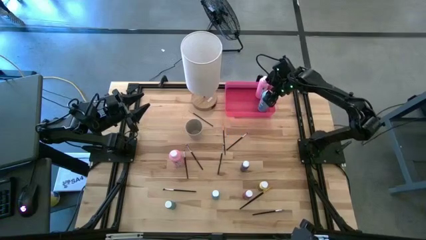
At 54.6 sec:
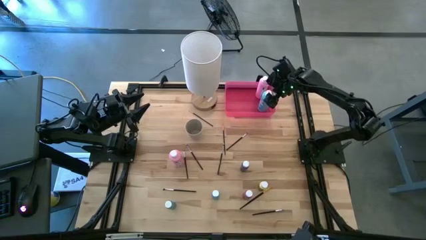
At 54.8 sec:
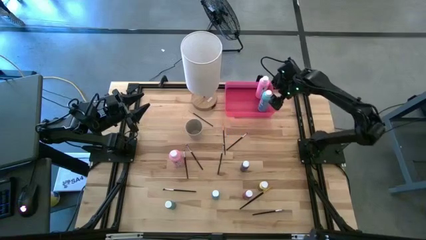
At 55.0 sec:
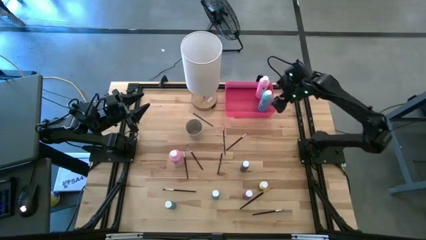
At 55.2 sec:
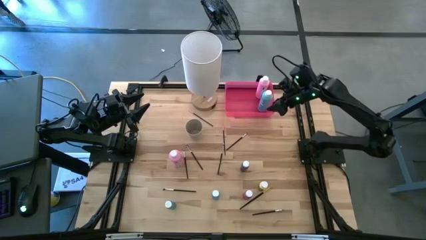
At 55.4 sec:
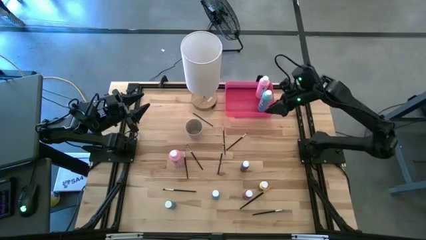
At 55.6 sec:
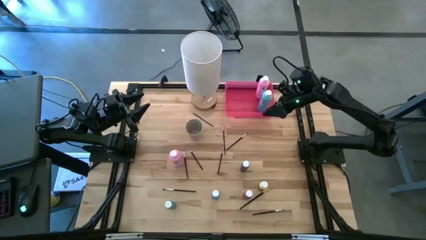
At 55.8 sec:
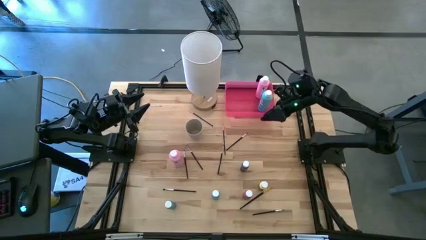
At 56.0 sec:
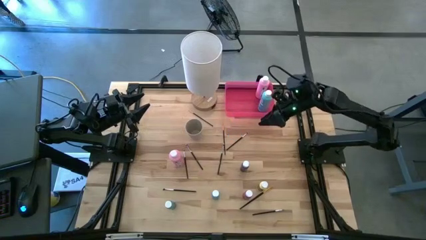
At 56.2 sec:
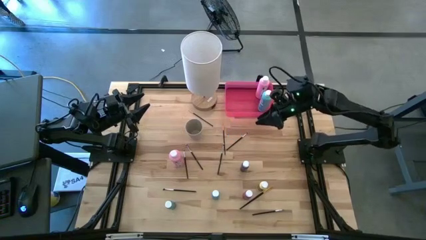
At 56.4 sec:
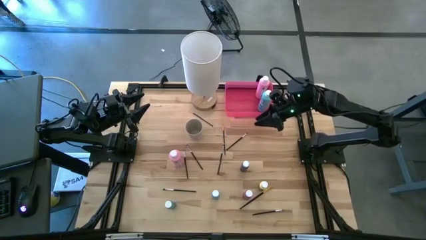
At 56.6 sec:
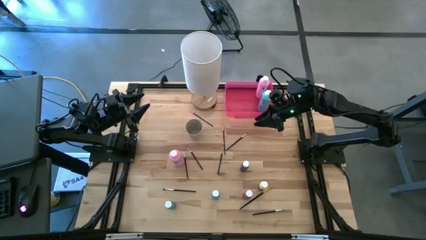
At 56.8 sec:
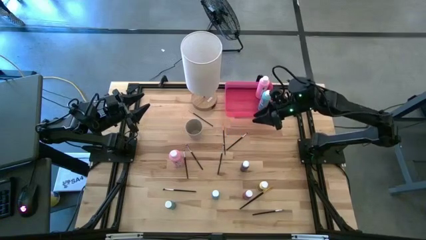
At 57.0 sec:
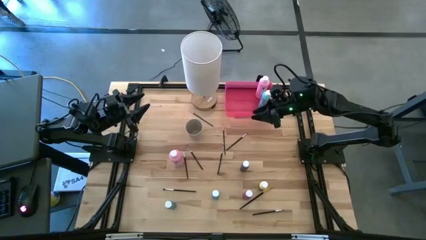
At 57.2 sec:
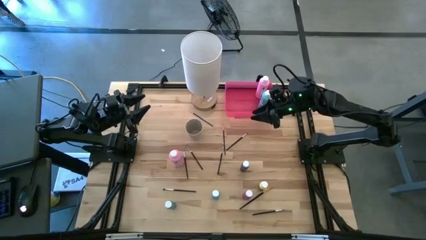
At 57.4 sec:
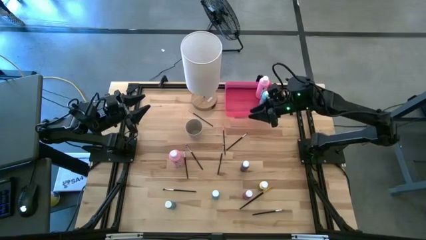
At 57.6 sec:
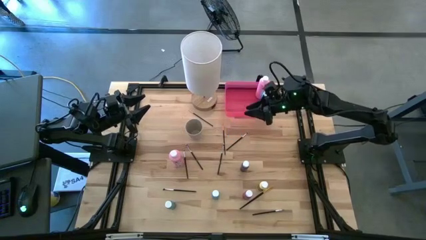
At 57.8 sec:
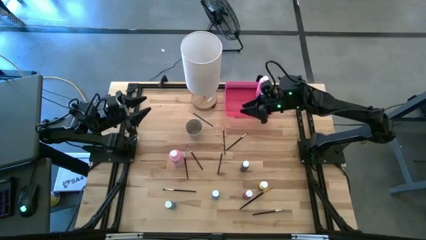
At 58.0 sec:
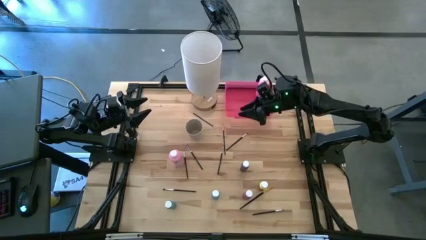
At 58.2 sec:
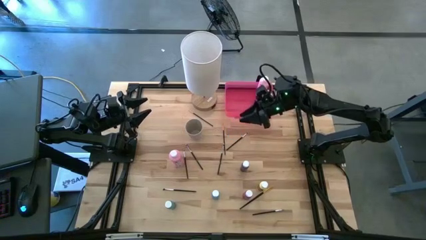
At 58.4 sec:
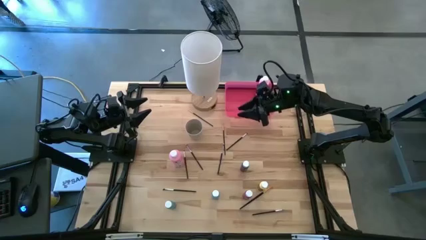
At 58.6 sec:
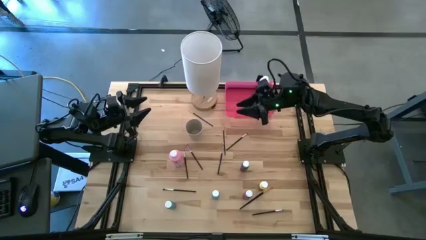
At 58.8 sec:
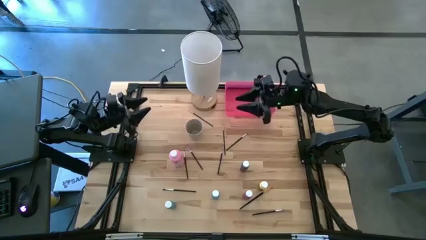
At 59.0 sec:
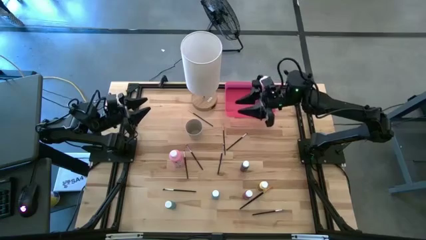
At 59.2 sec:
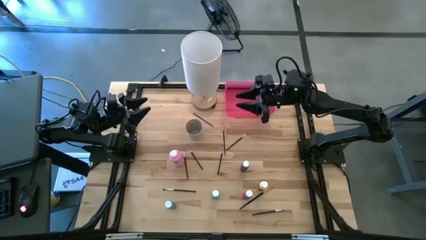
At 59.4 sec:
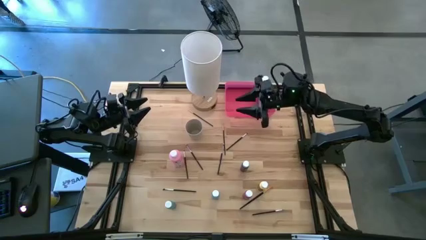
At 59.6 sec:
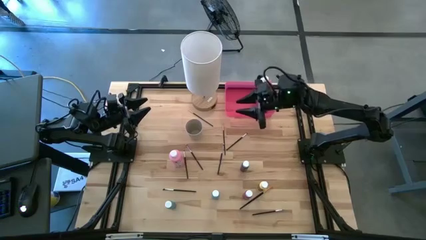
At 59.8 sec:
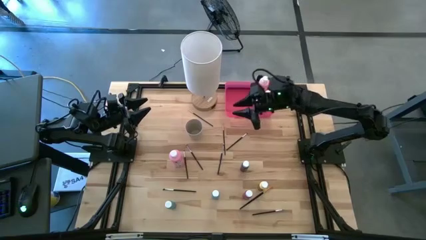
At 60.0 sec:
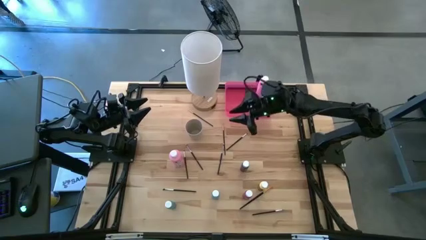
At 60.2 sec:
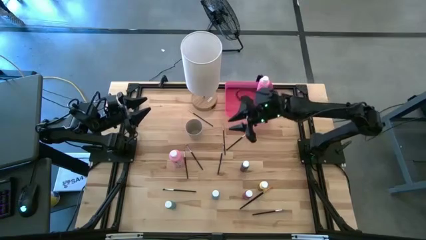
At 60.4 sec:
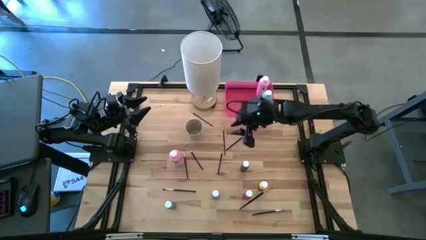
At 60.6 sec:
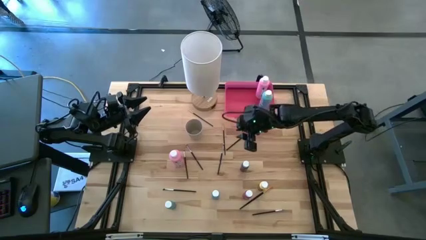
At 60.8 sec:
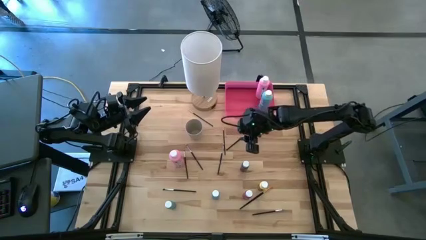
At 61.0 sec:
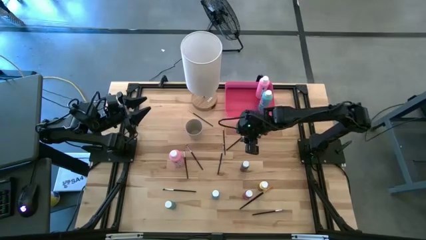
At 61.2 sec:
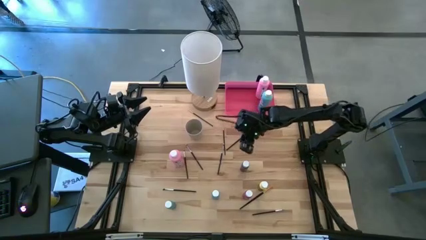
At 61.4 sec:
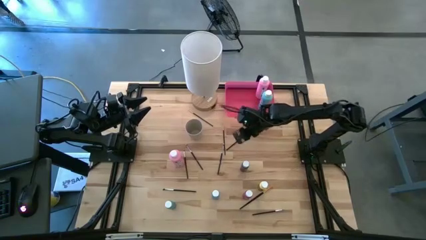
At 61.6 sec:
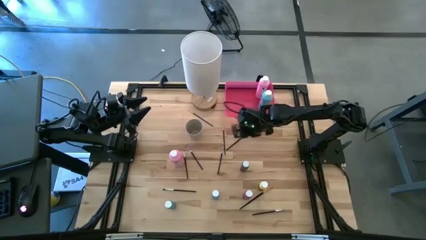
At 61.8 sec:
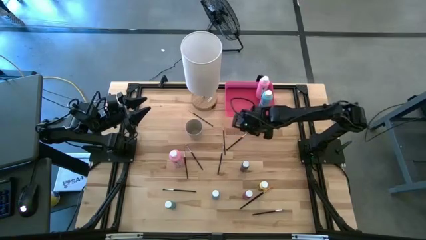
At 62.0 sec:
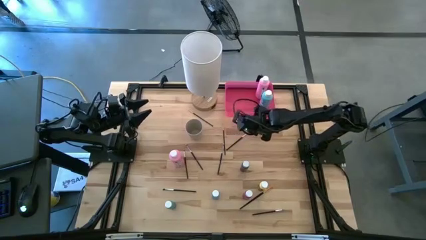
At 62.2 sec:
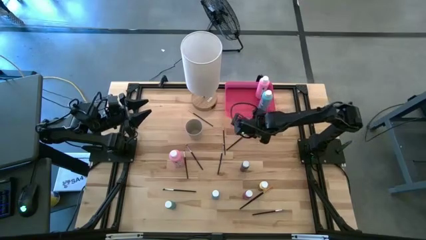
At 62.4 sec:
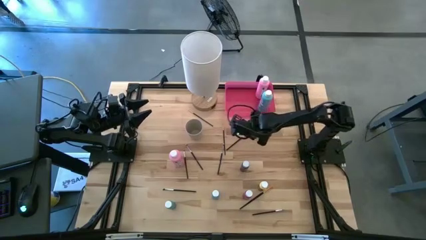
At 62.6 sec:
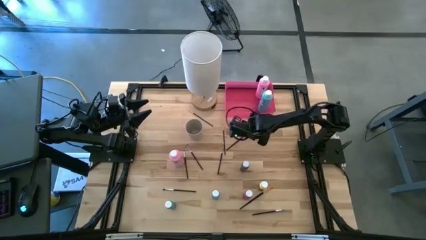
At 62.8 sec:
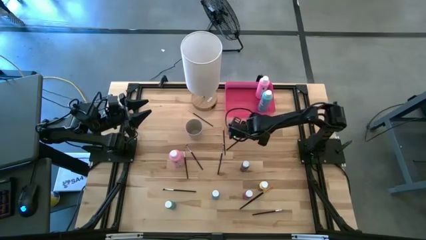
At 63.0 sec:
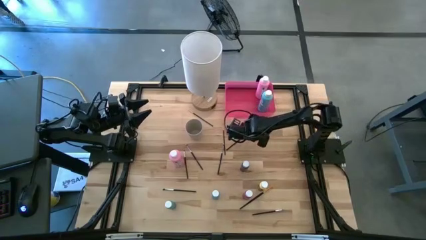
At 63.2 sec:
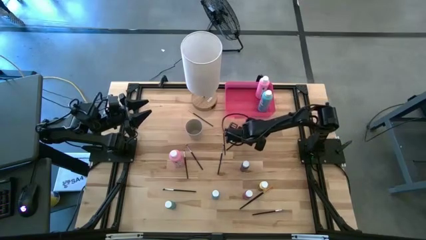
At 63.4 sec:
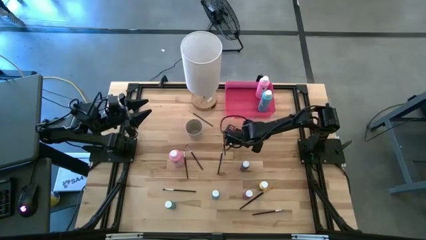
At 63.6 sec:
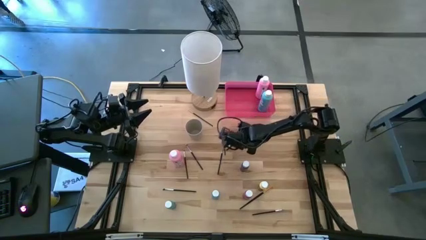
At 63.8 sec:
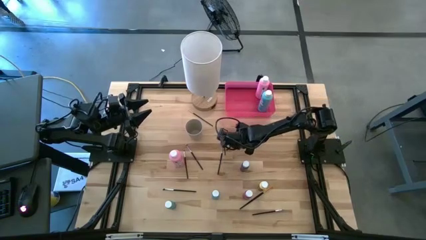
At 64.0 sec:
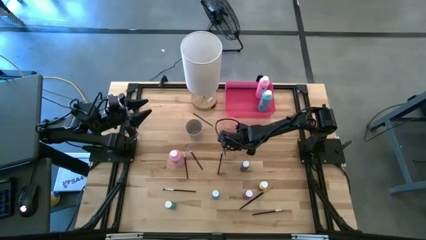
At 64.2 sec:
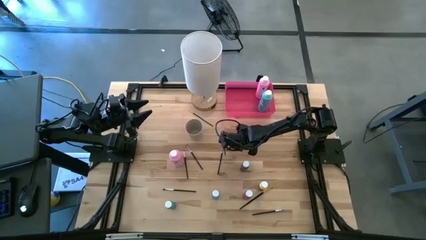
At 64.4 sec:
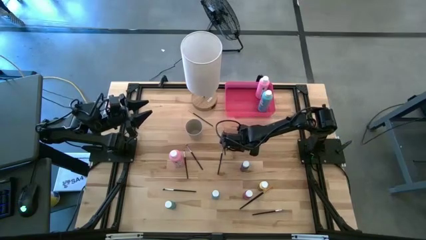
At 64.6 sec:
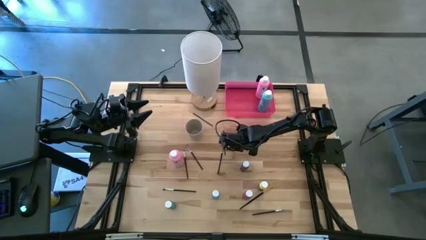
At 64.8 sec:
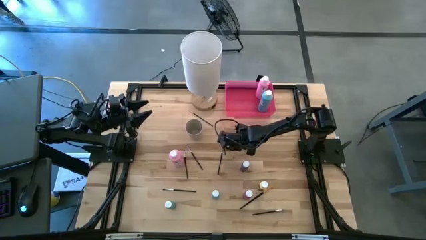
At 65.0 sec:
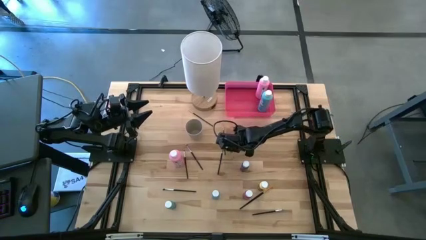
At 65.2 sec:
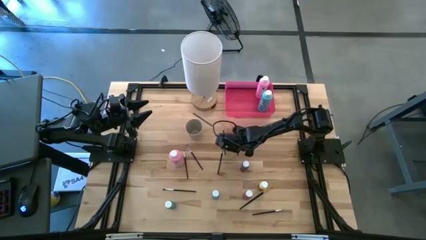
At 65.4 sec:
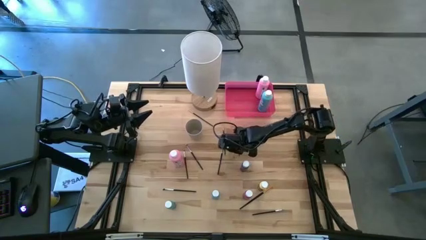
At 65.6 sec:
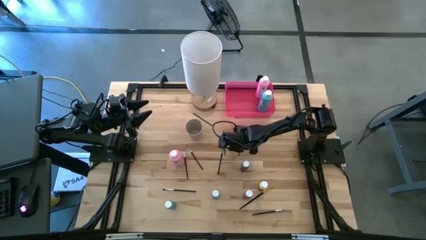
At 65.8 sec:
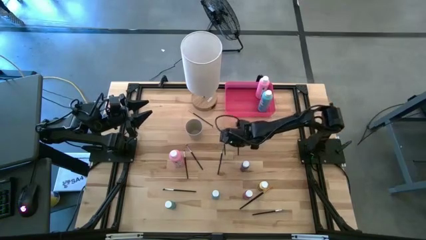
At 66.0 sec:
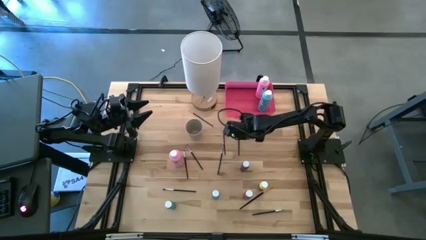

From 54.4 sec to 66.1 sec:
Task: Pick & Place Paint Supplies
Put the silver eyeshadow brush into the white cup
